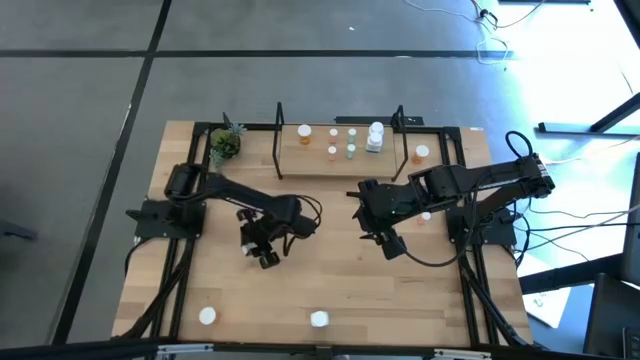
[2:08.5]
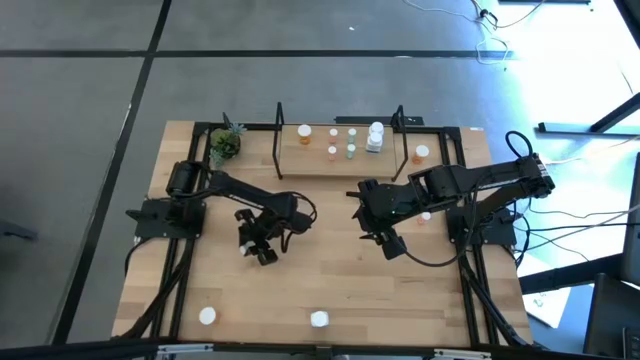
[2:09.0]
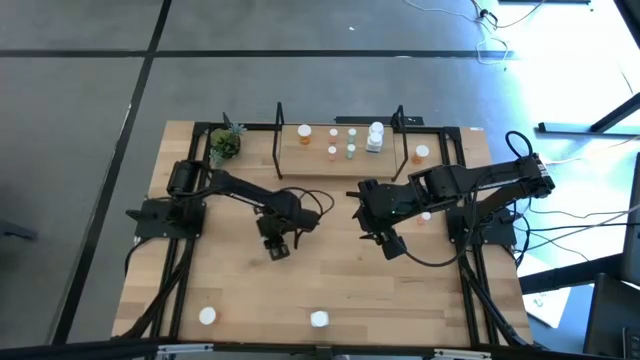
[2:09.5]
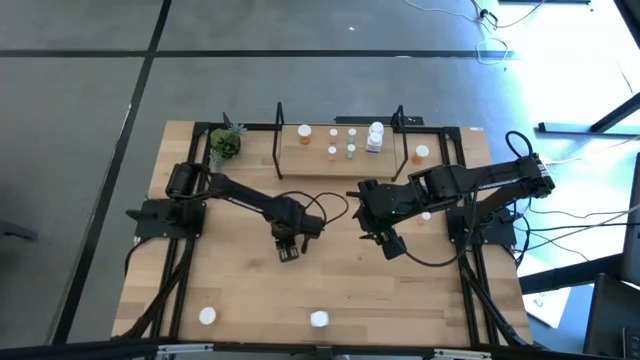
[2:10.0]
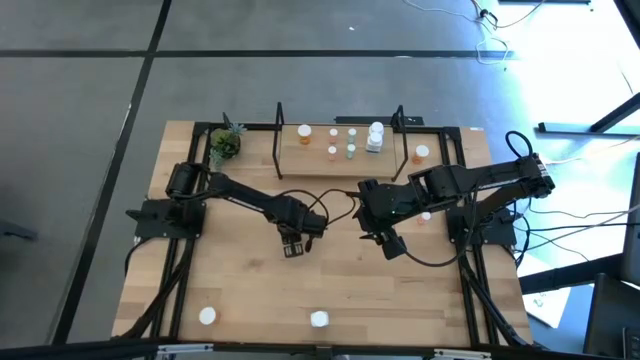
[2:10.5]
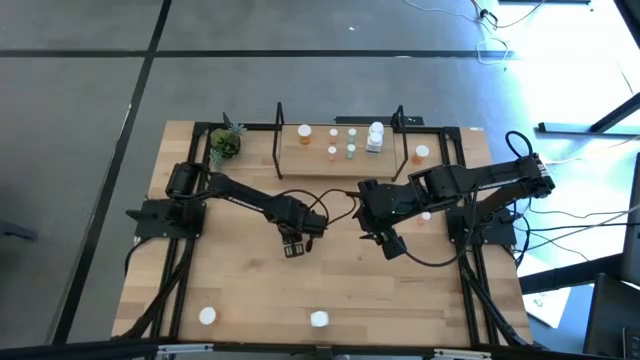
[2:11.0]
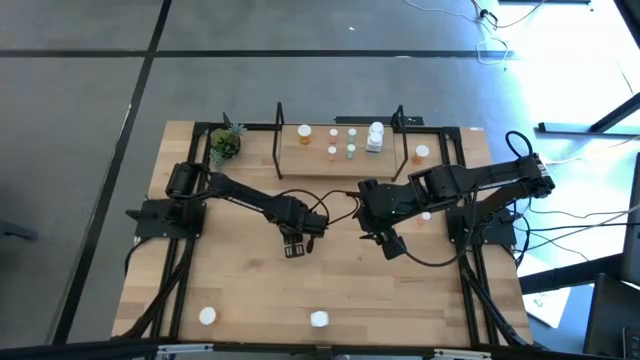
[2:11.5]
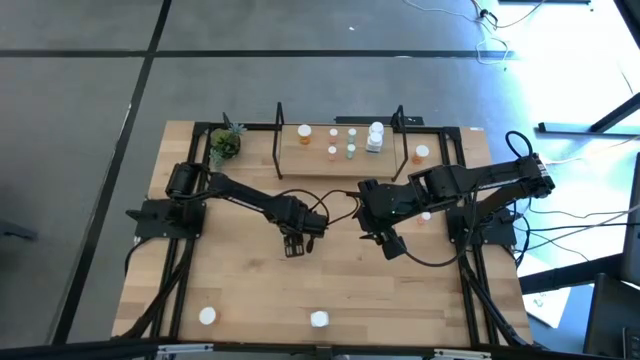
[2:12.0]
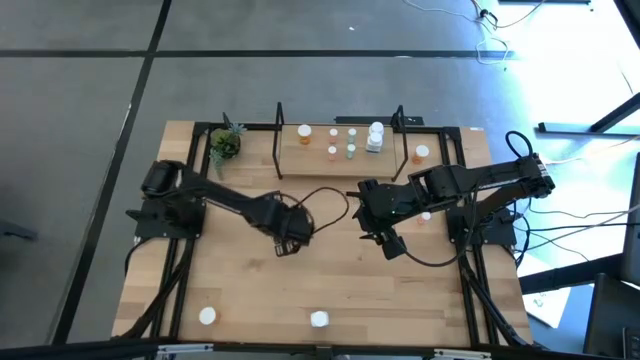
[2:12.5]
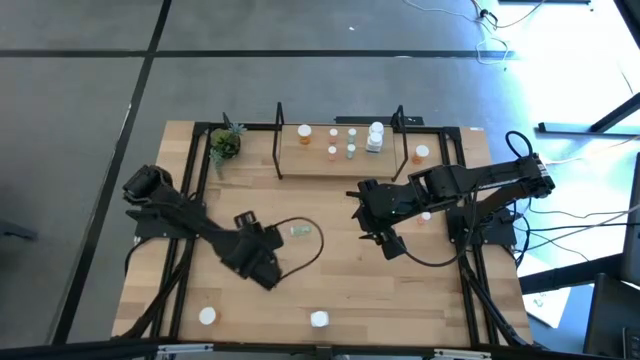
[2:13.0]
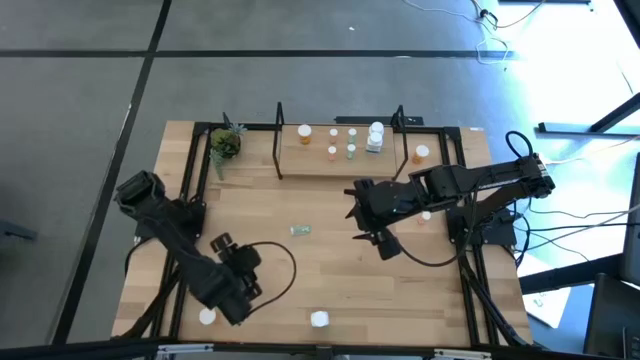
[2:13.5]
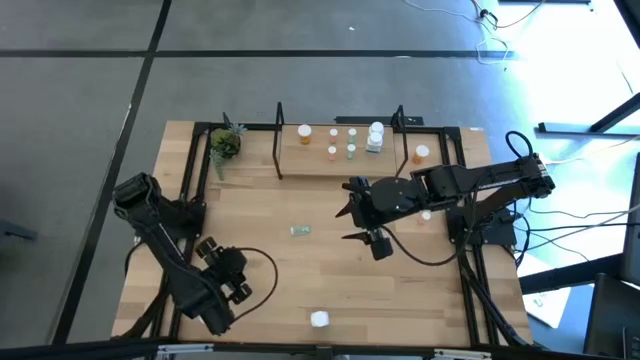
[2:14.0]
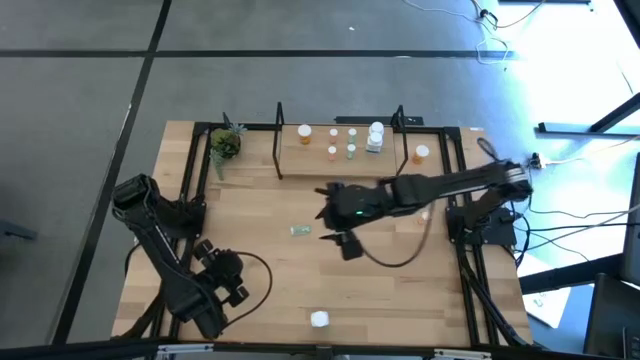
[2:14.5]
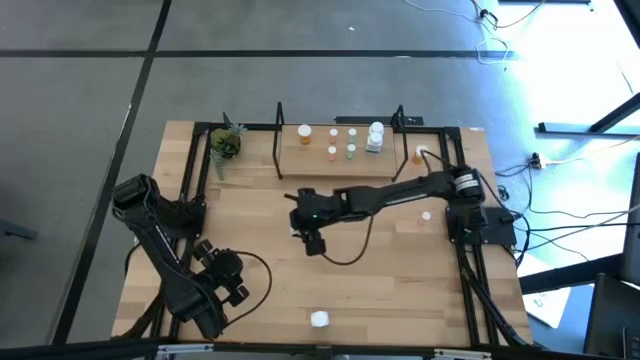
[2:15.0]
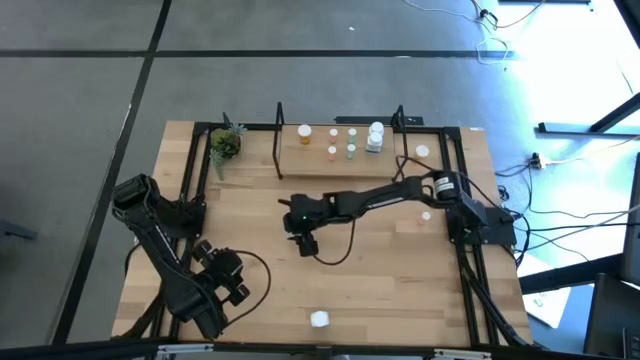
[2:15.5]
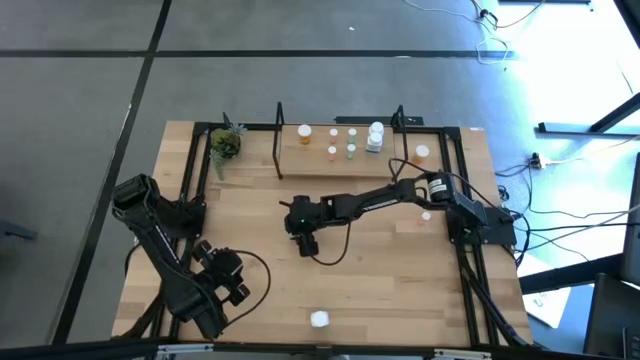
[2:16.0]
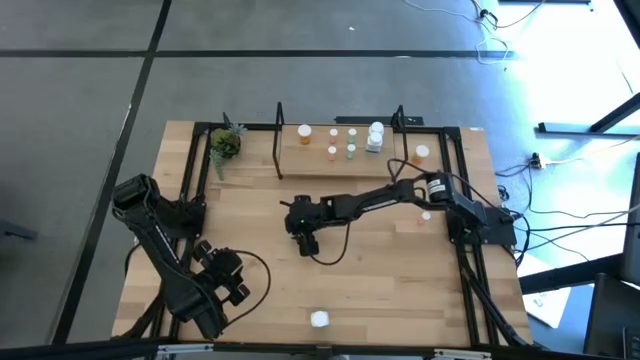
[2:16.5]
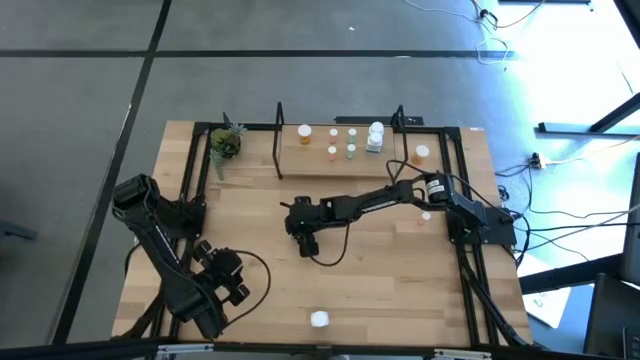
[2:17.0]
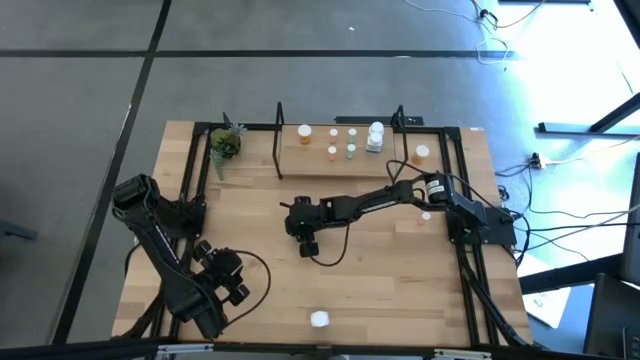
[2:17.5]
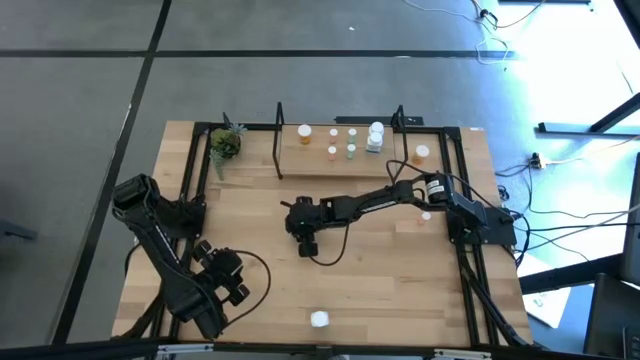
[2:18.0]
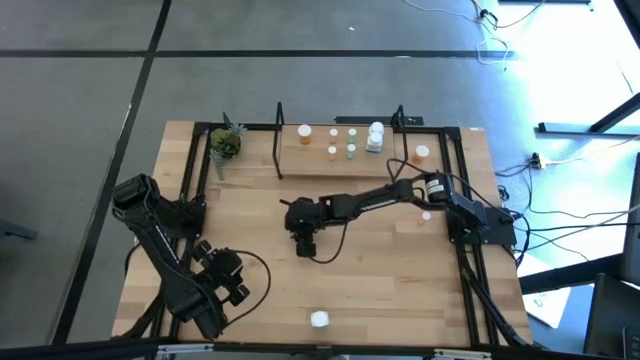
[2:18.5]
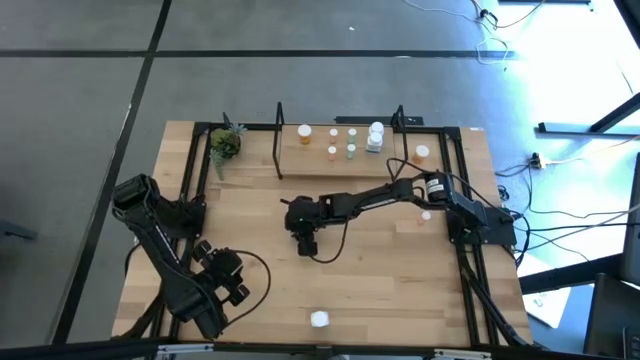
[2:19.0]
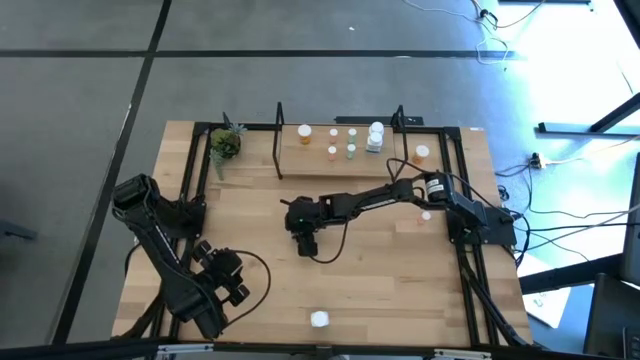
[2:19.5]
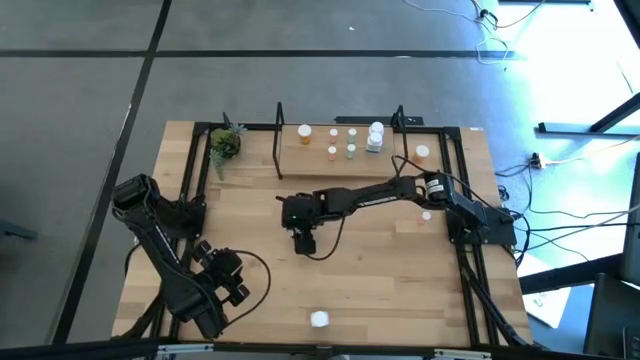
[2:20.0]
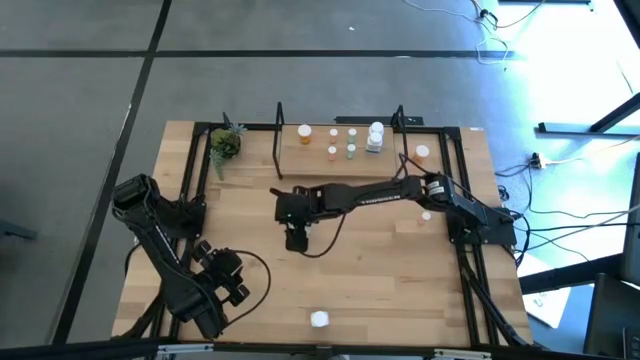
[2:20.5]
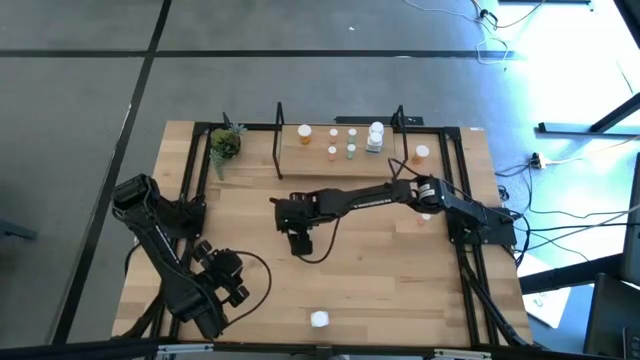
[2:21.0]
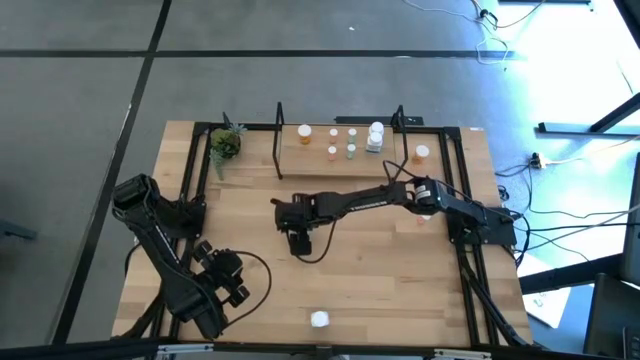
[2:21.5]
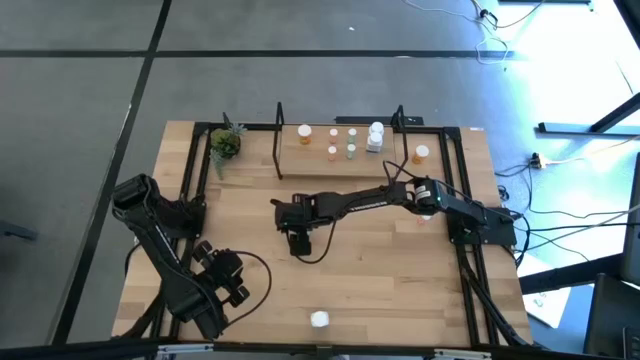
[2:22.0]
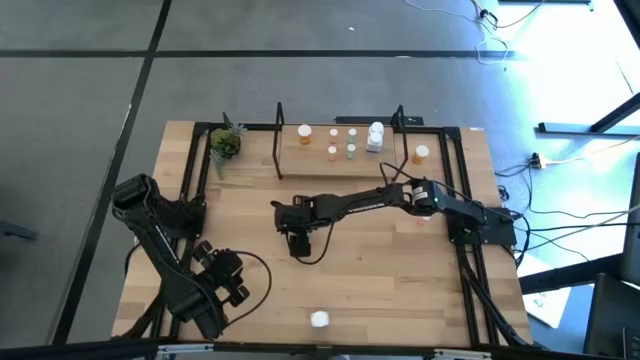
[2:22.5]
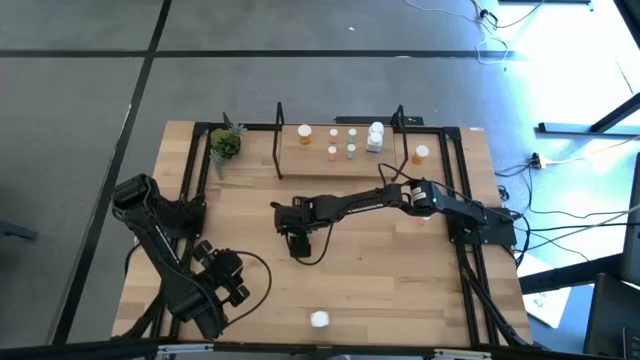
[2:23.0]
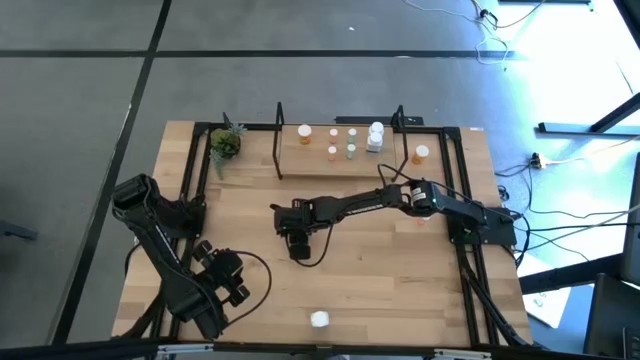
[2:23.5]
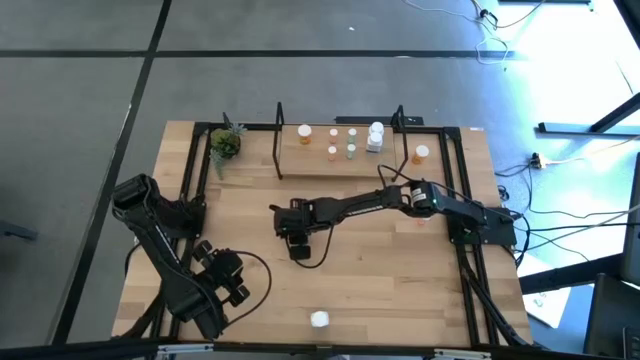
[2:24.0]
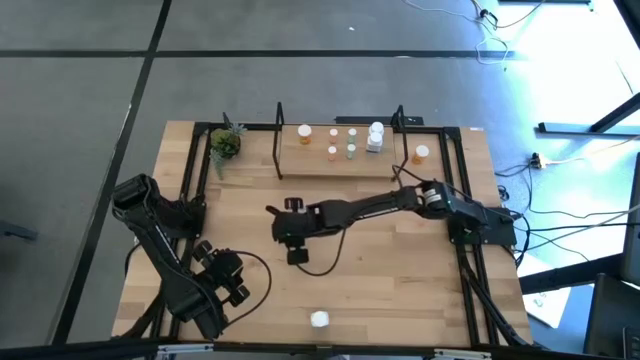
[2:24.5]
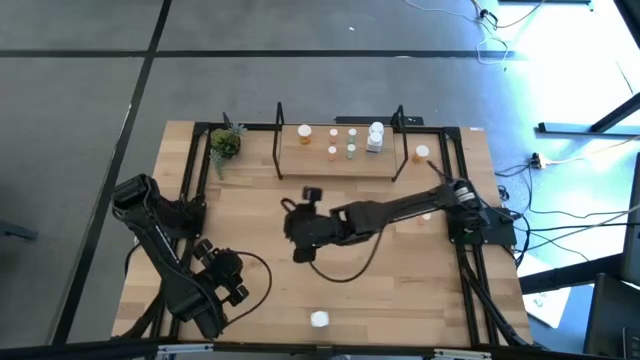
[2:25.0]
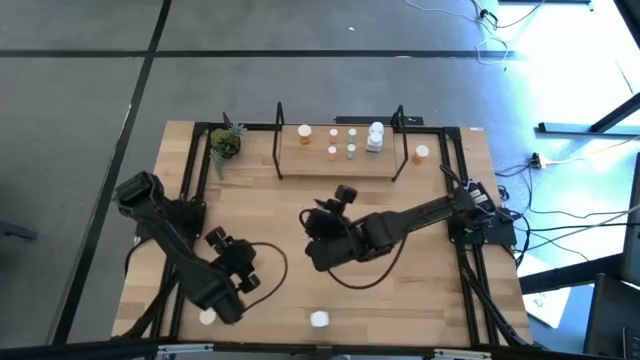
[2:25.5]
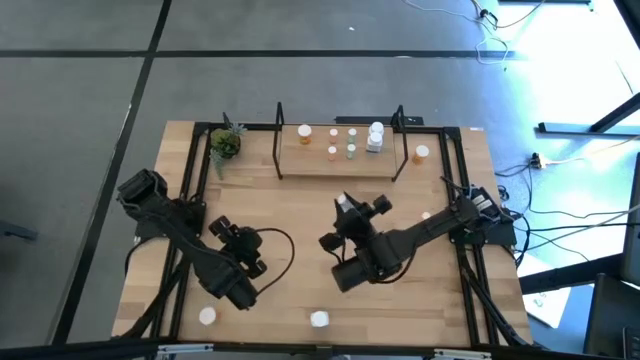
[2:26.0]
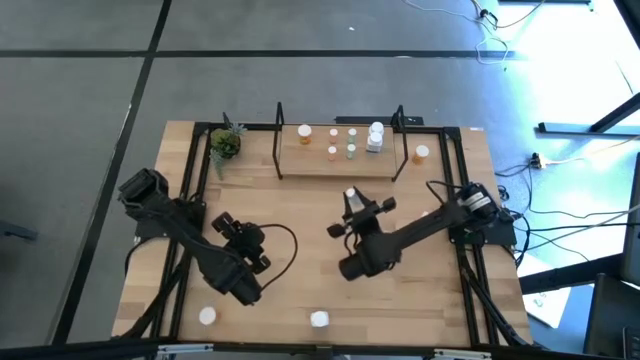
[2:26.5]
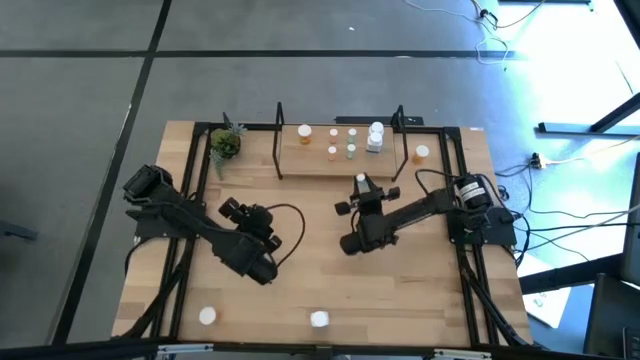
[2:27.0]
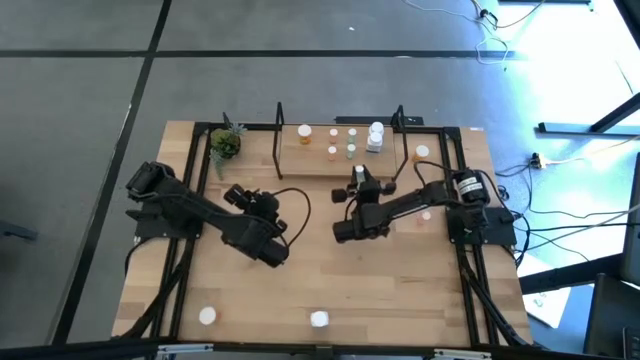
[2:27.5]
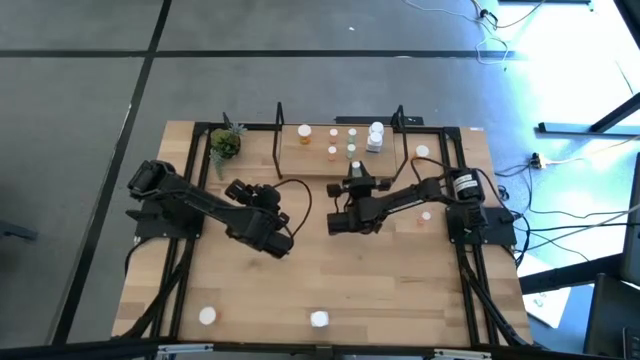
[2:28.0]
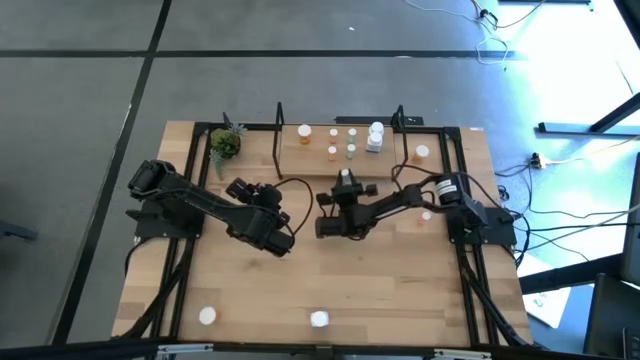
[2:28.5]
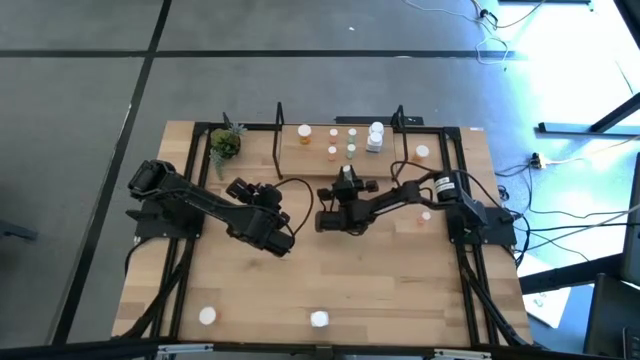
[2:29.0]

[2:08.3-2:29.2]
Task: Pick and place medicine bottles onto shelf by color
Put the green pill bottle on the shelf aligned with the green bottles
